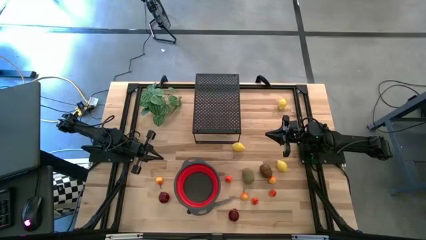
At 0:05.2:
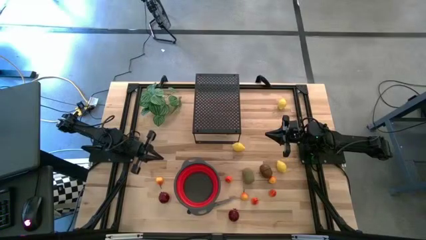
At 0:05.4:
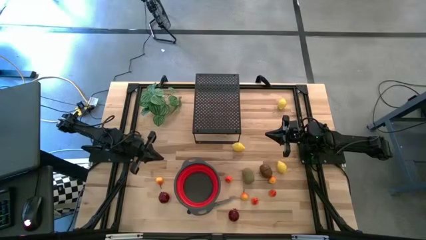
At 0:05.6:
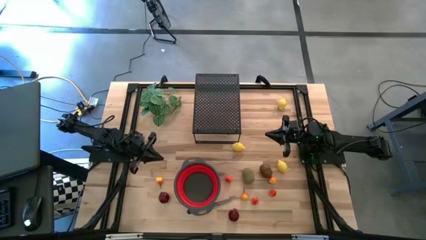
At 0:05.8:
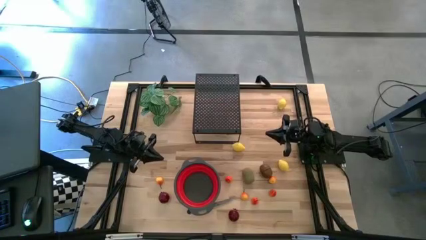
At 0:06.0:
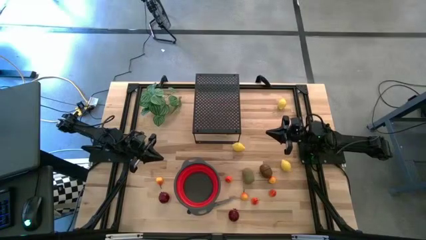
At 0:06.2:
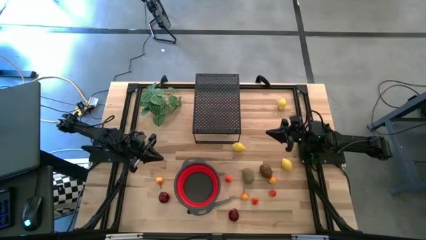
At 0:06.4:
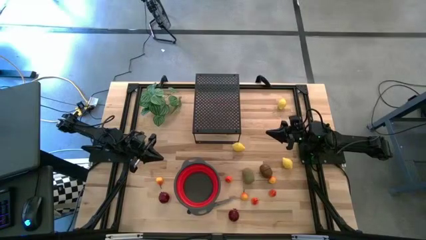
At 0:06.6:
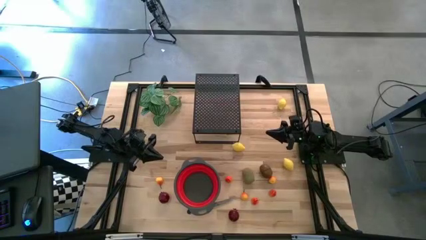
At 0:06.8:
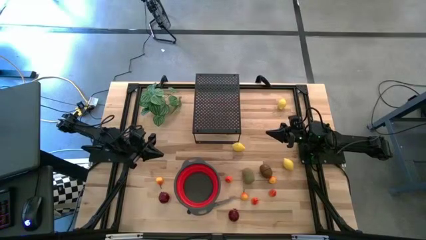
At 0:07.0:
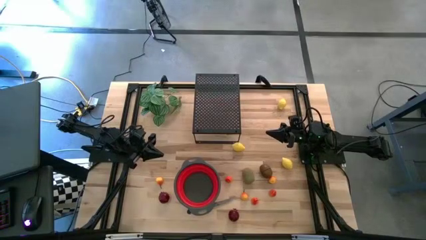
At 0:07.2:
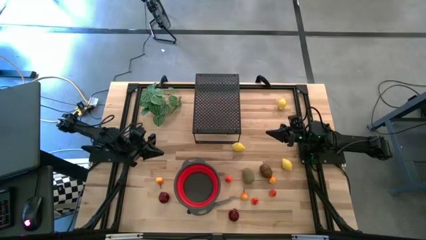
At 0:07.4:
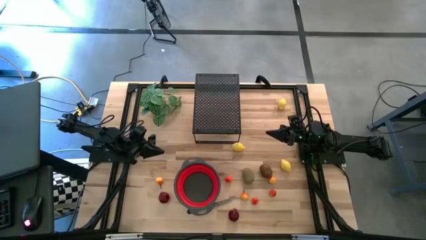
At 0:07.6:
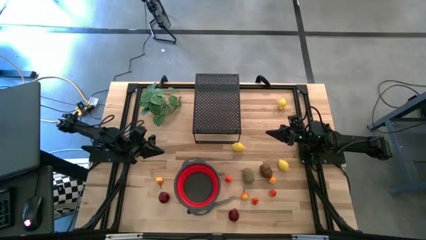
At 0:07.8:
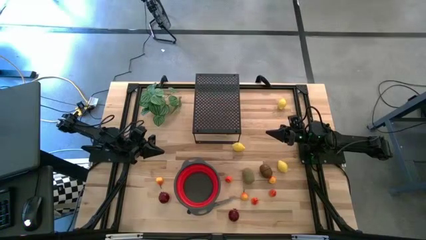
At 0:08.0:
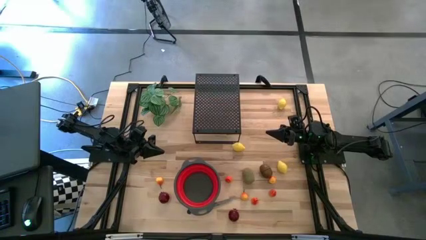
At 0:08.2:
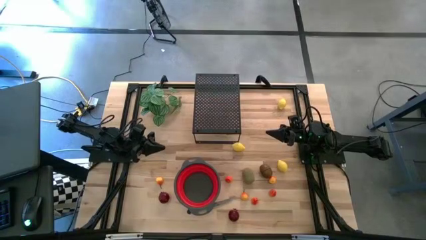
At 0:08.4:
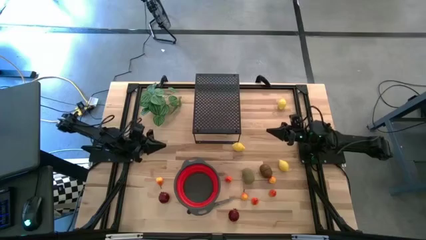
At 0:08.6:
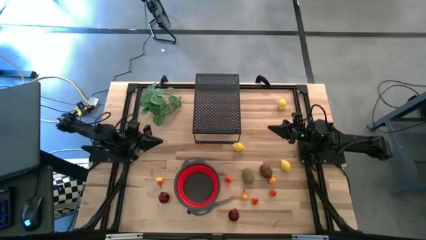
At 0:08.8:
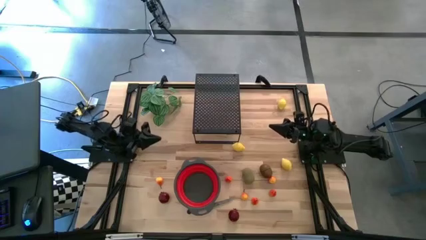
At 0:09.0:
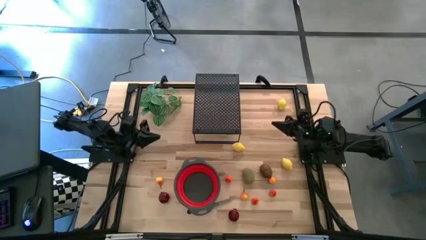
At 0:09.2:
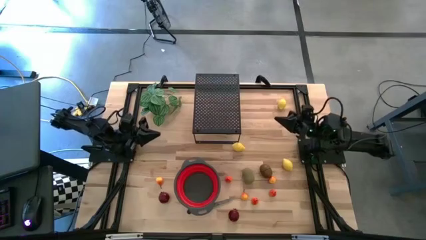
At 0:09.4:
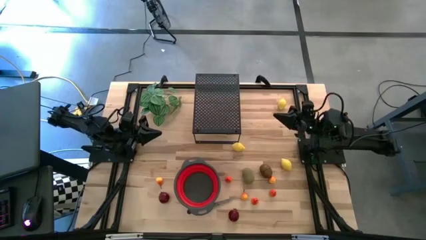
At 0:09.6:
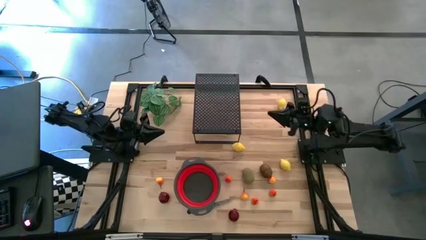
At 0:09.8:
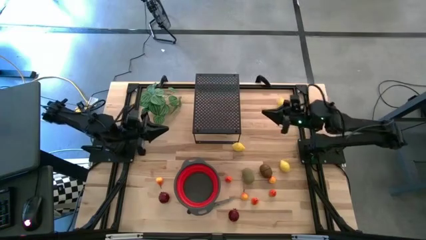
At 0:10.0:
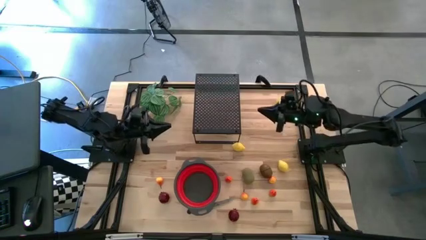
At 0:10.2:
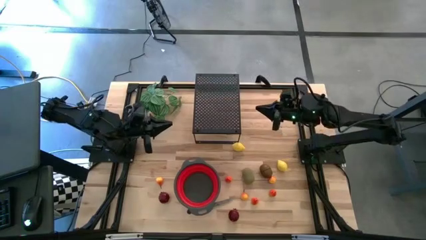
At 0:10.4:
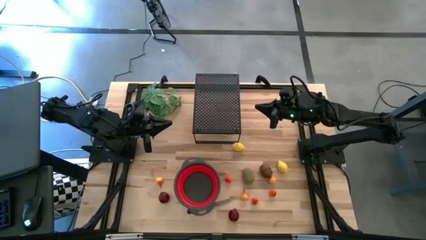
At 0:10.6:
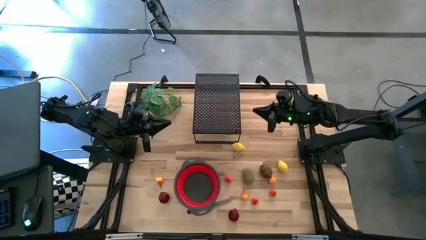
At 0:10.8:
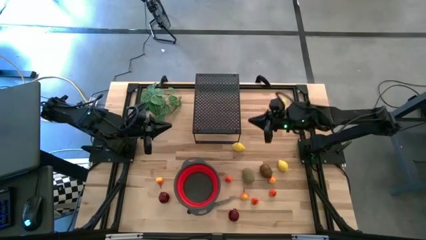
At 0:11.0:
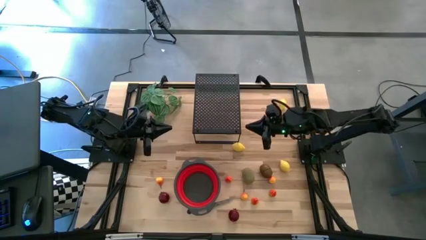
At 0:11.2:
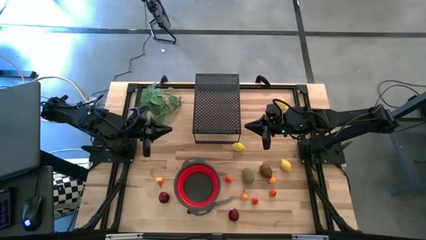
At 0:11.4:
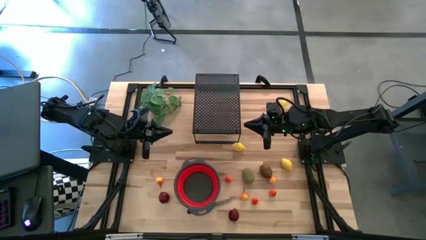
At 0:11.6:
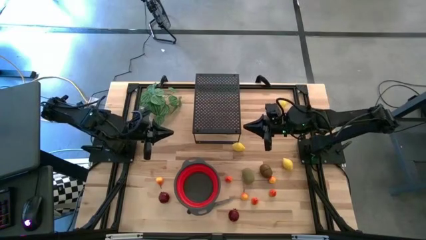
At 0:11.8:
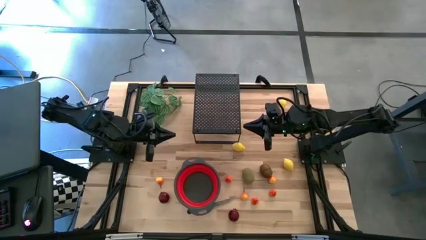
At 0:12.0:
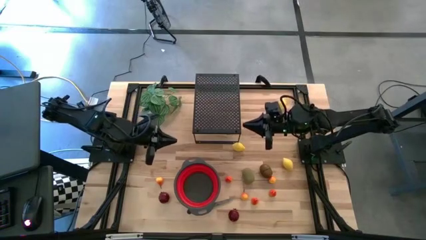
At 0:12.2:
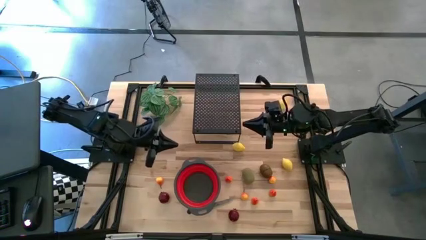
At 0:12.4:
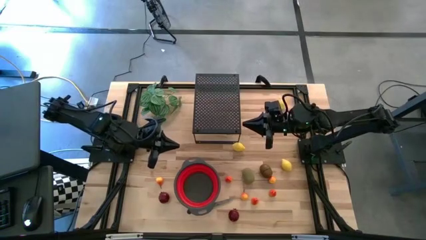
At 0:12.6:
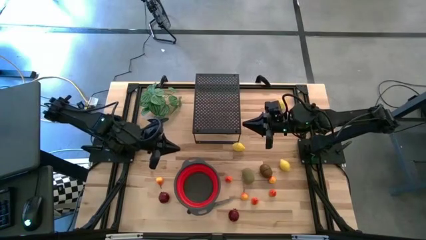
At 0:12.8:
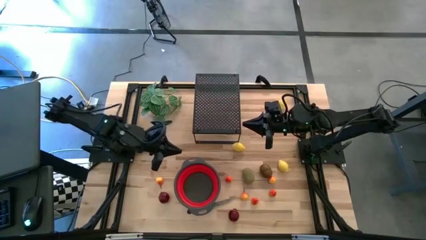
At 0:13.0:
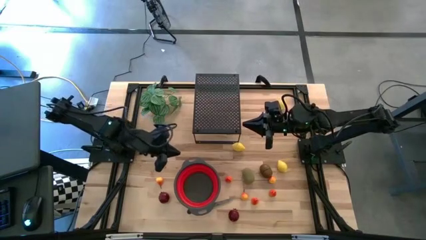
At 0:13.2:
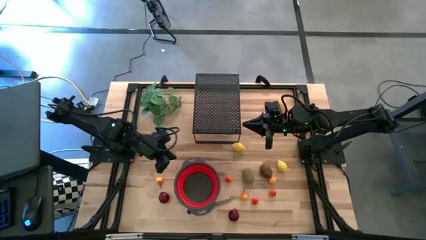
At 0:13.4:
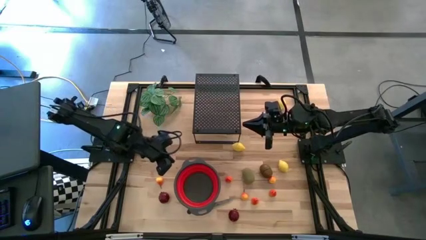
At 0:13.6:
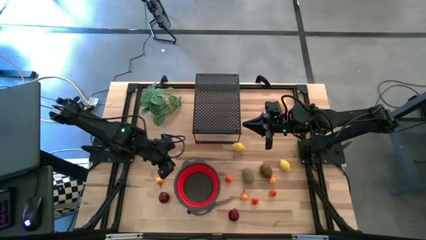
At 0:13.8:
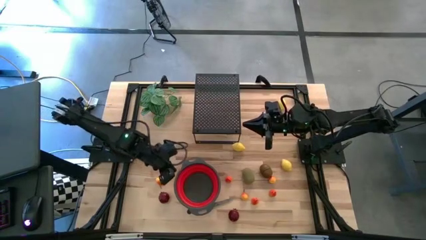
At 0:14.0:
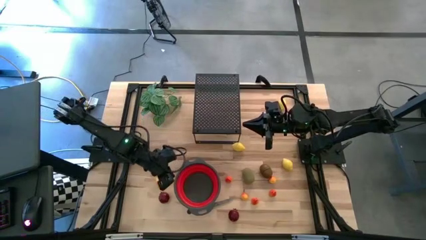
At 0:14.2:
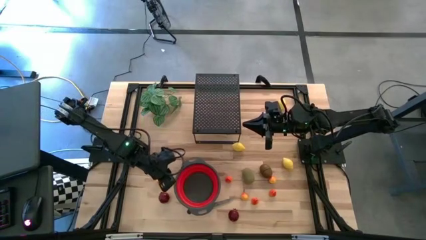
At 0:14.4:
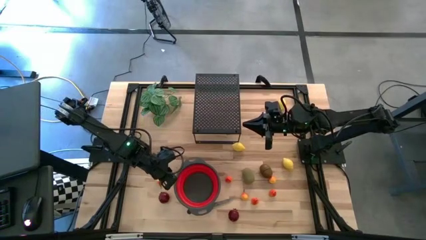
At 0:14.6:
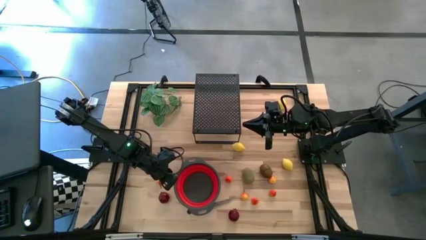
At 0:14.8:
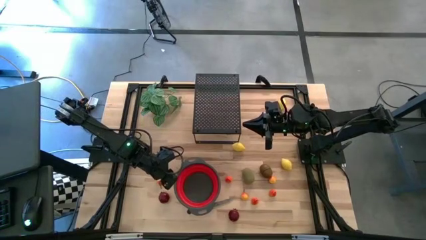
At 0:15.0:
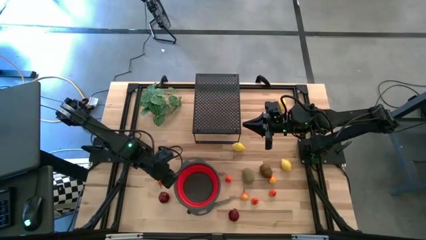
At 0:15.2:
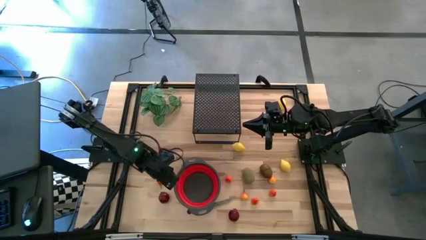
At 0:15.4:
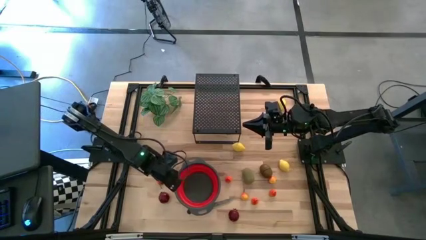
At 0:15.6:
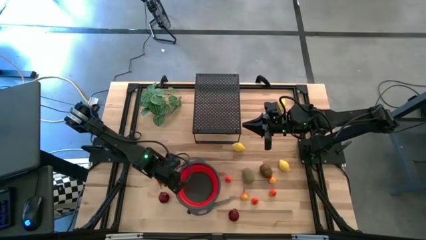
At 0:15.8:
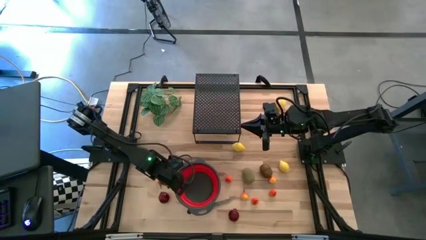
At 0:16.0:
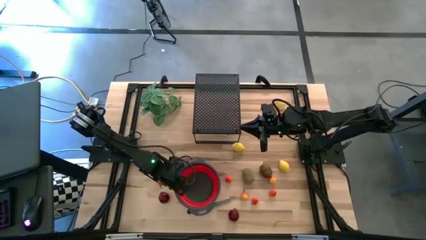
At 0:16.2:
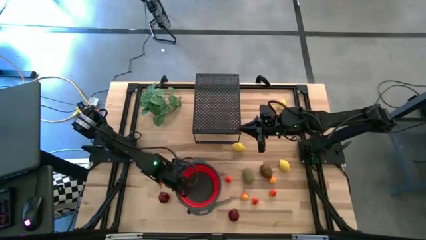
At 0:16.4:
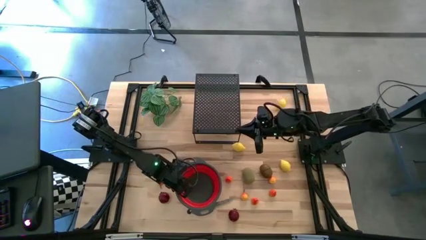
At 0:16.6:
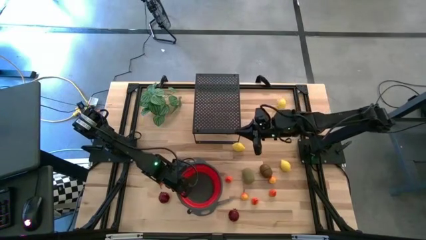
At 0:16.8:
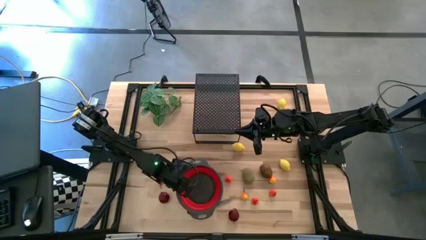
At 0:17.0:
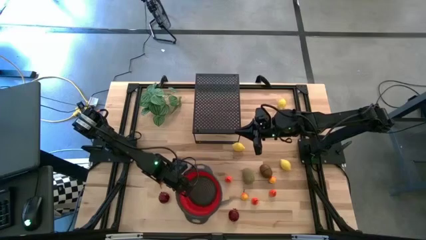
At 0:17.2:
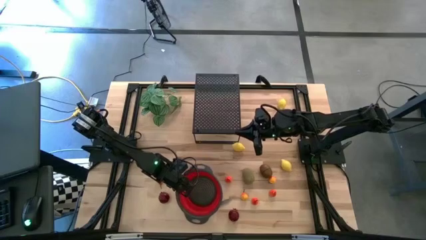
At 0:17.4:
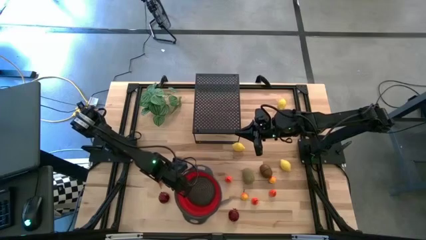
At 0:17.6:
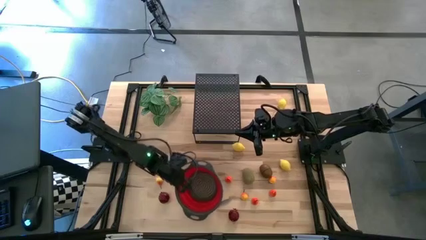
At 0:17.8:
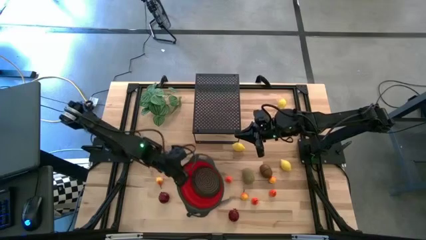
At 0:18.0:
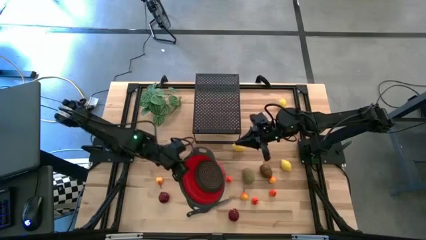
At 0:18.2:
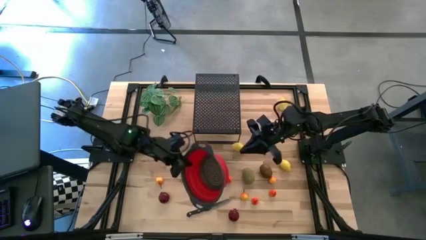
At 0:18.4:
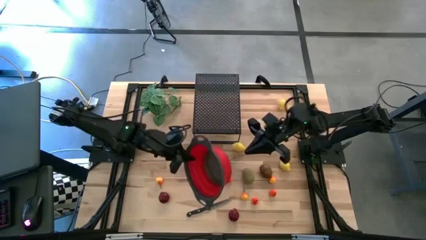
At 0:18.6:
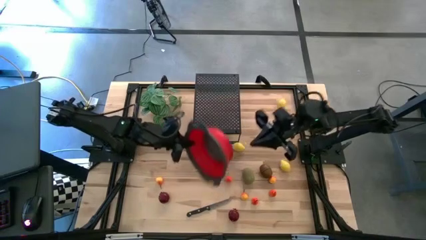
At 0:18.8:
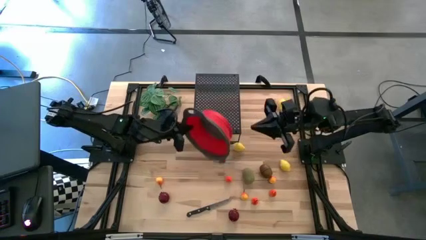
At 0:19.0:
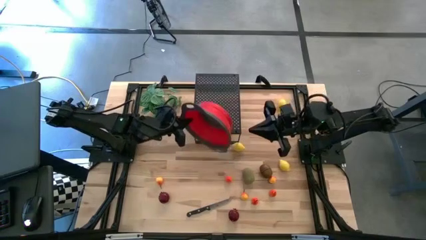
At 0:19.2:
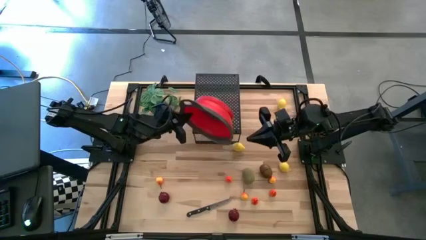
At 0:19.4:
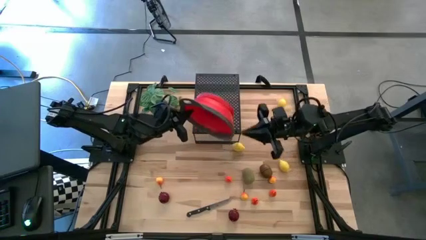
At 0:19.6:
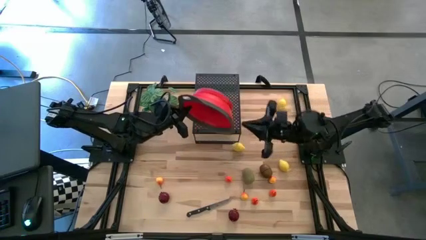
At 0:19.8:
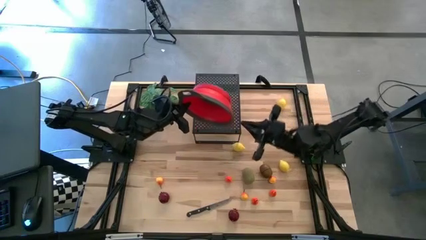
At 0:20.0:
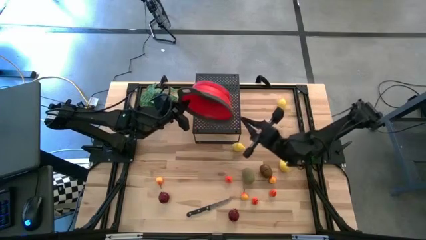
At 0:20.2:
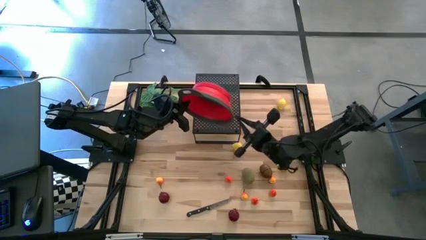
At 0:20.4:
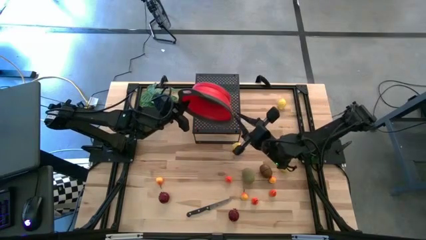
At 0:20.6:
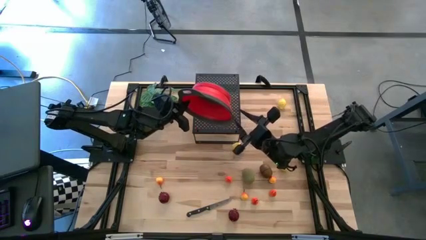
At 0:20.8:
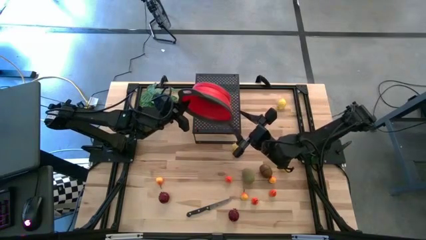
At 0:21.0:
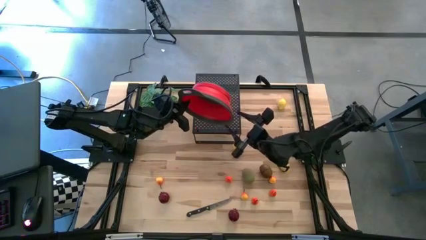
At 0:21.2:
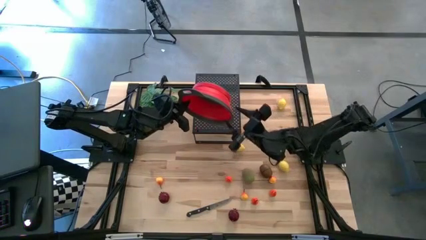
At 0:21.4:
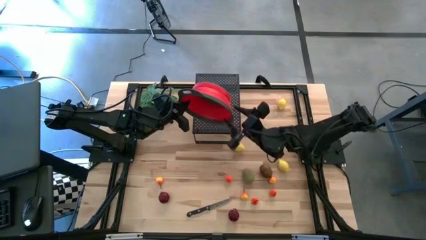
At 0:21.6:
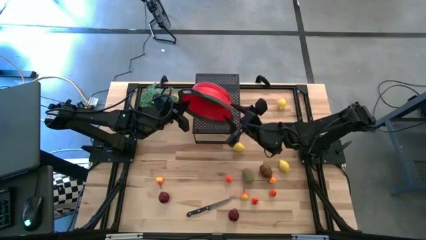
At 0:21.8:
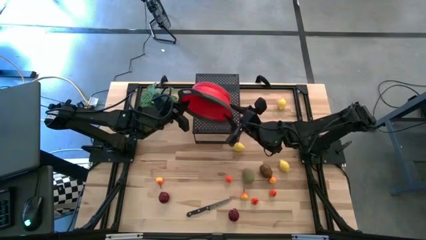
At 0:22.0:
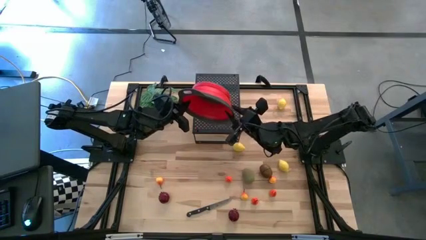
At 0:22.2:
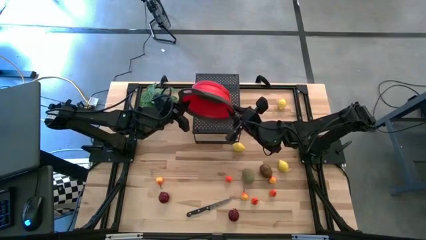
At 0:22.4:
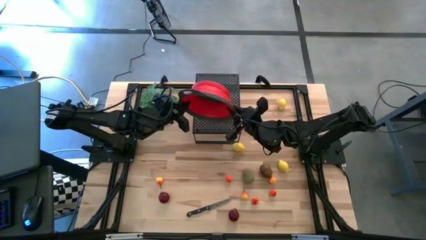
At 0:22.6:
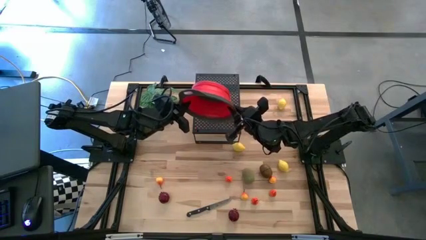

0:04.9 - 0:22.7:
Task: Pick & Place Fruit
Put the red strainer bowl on the shelf
